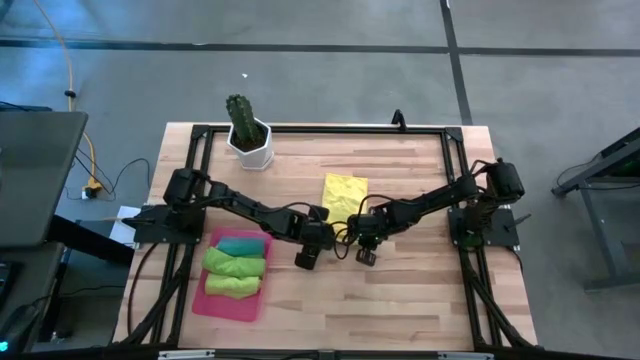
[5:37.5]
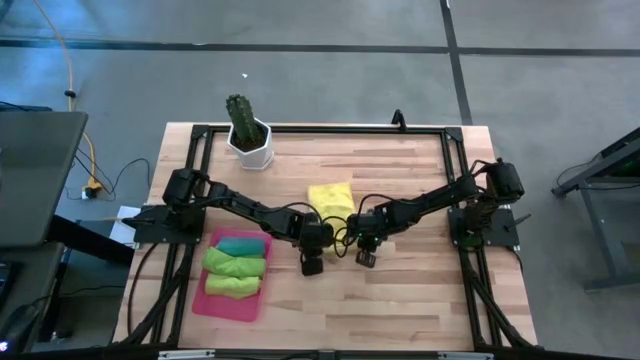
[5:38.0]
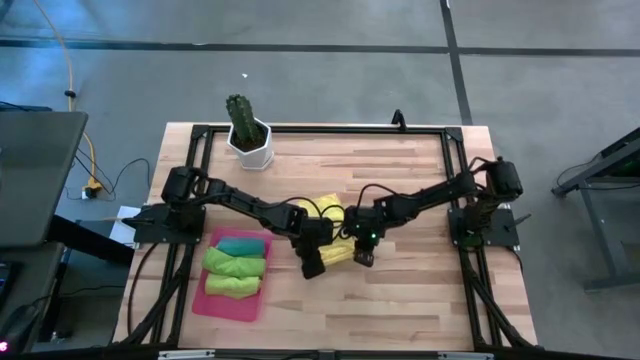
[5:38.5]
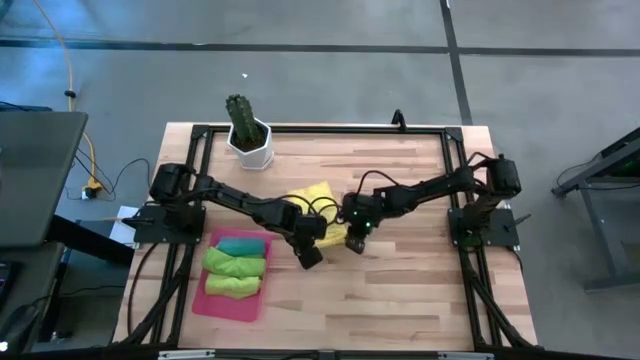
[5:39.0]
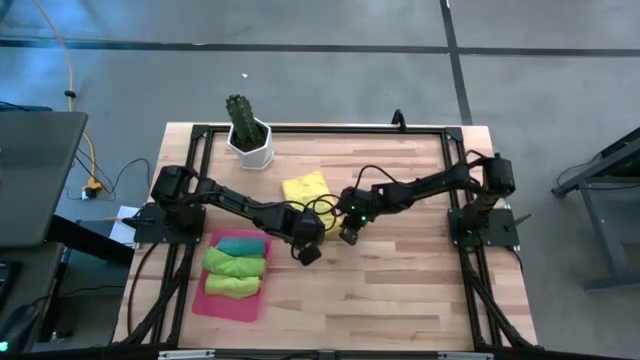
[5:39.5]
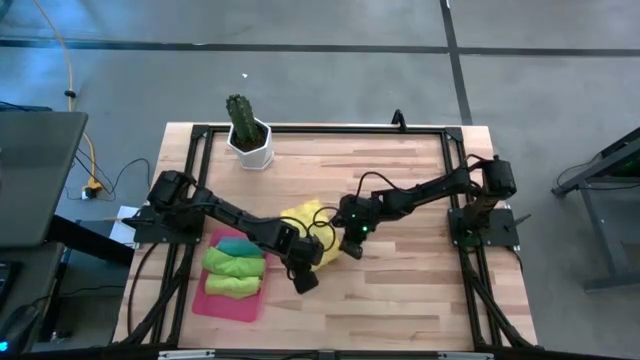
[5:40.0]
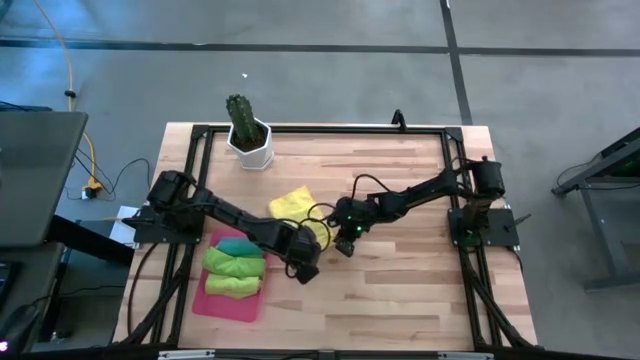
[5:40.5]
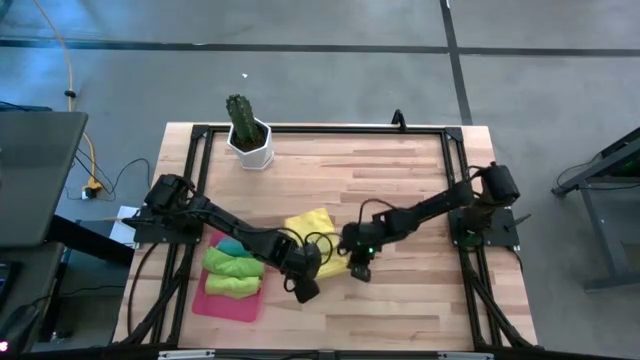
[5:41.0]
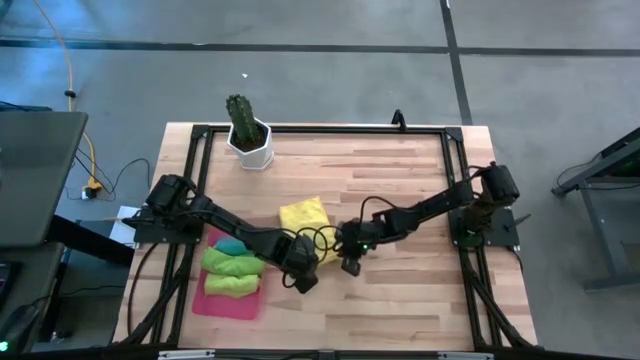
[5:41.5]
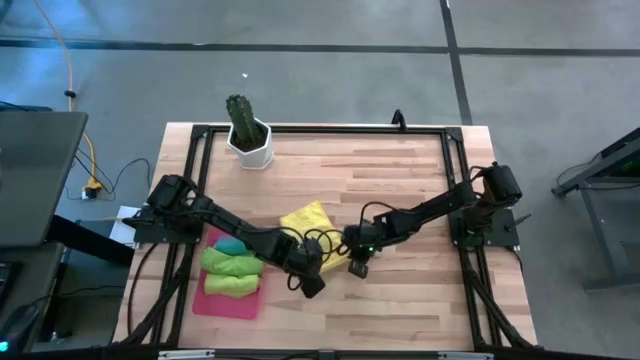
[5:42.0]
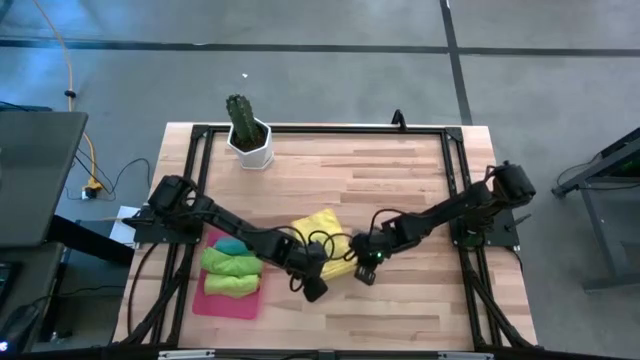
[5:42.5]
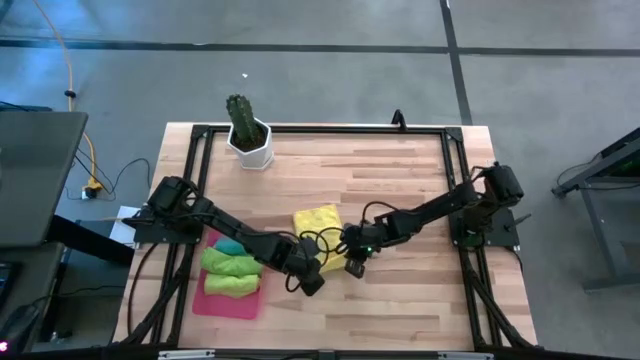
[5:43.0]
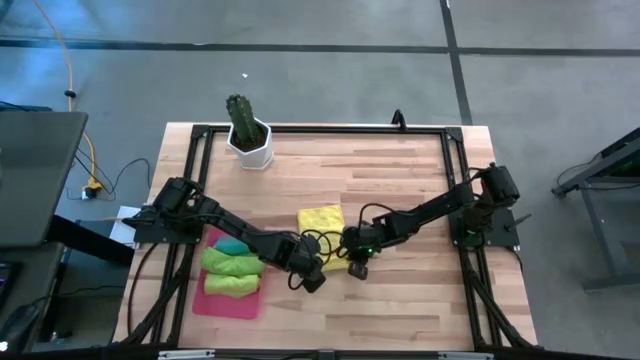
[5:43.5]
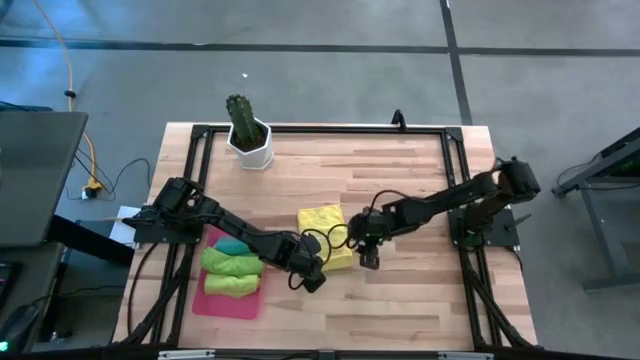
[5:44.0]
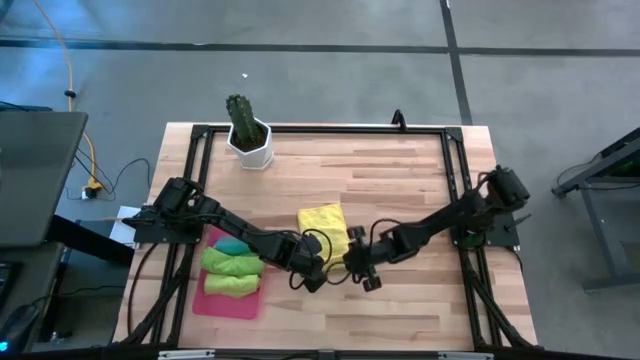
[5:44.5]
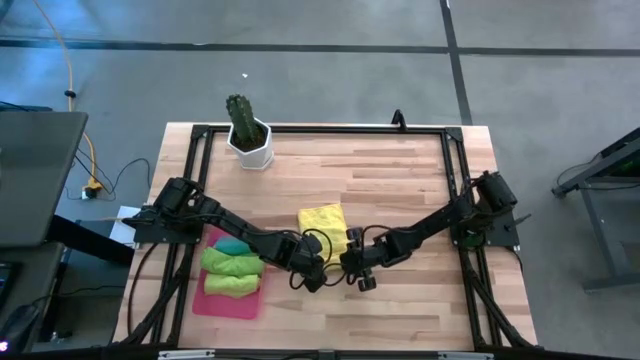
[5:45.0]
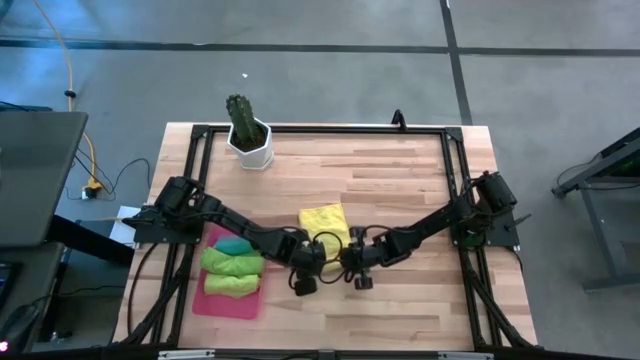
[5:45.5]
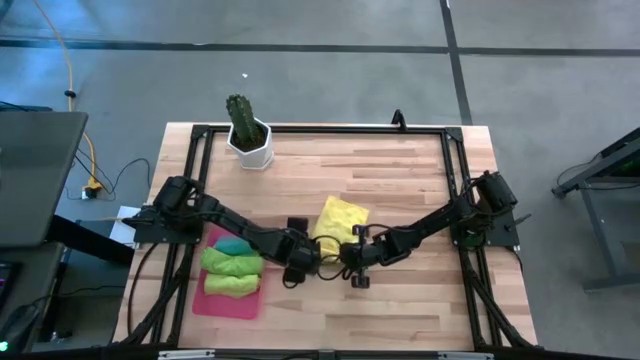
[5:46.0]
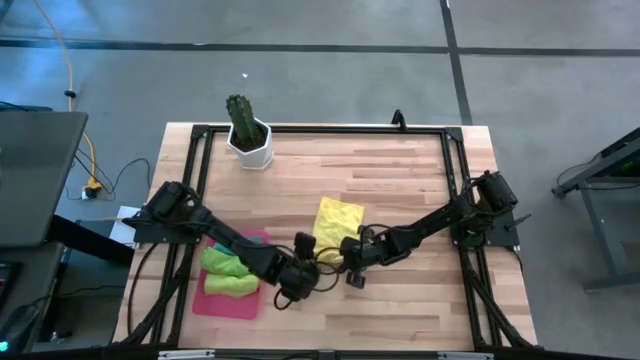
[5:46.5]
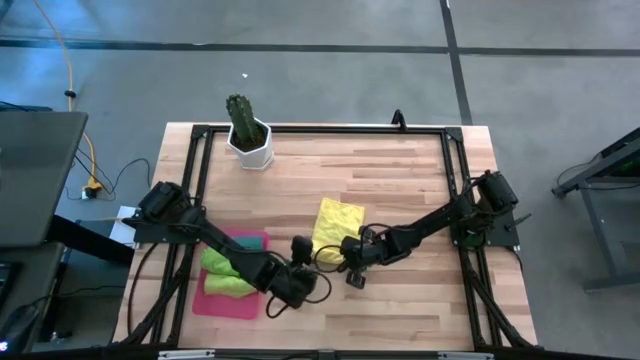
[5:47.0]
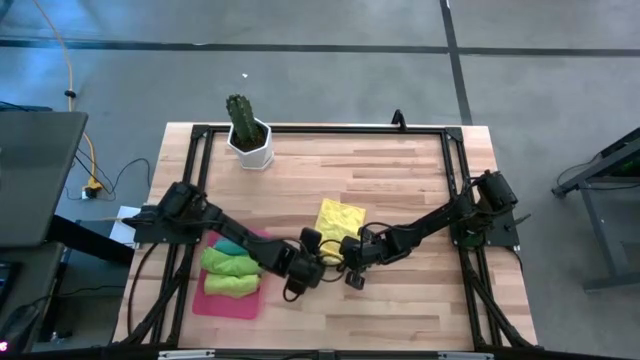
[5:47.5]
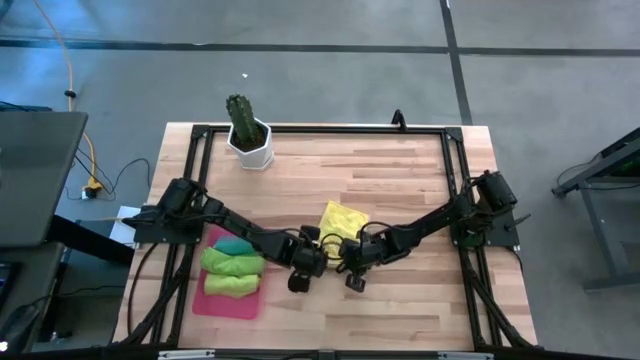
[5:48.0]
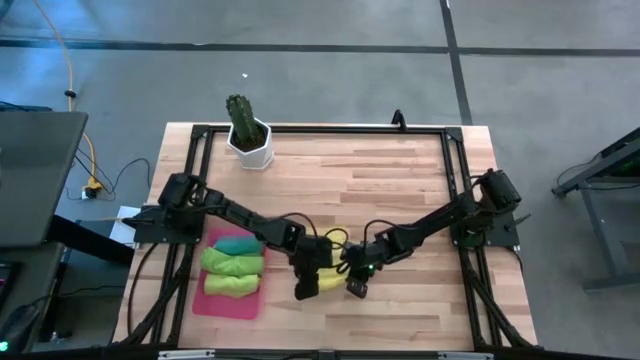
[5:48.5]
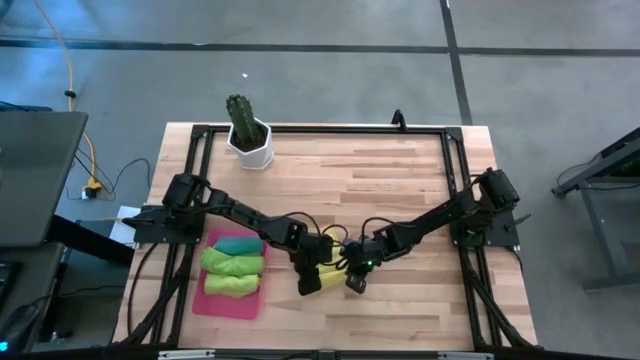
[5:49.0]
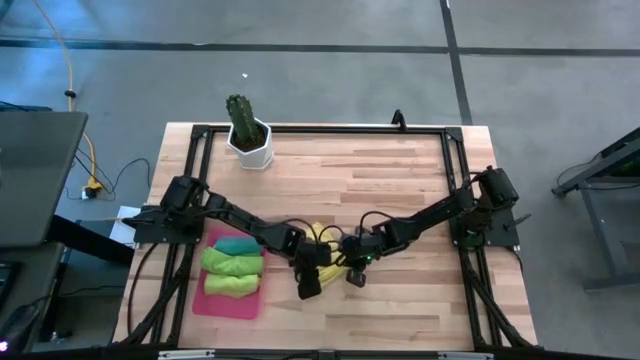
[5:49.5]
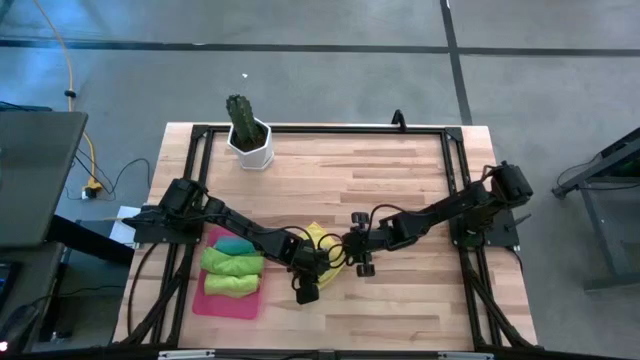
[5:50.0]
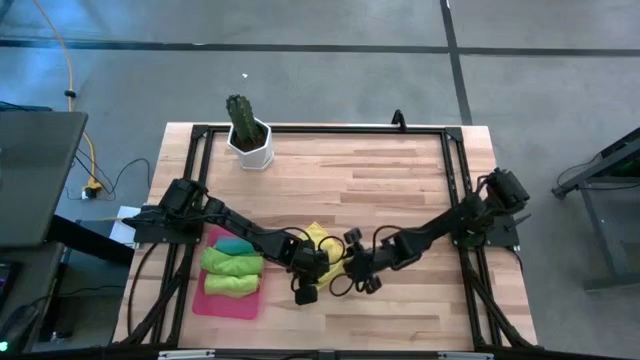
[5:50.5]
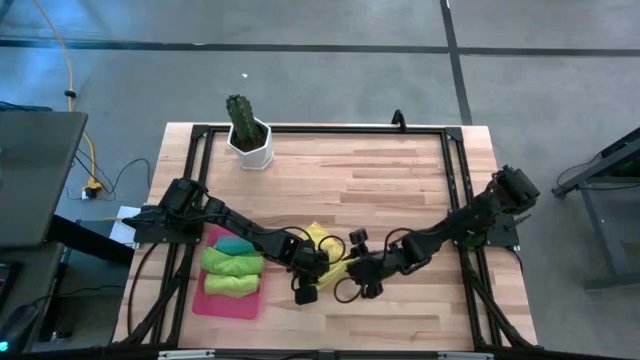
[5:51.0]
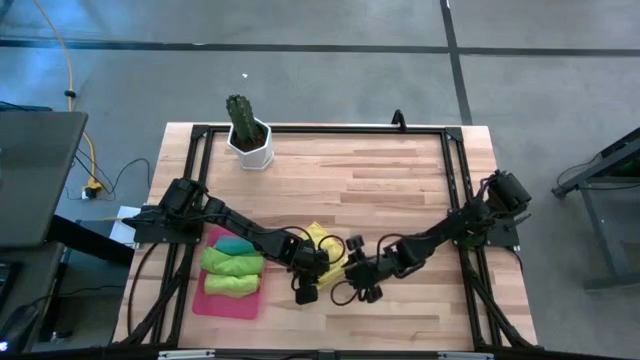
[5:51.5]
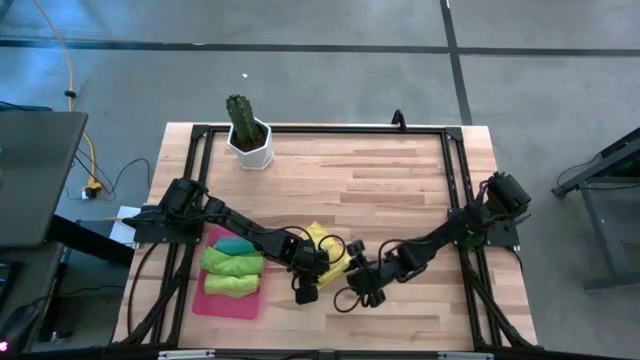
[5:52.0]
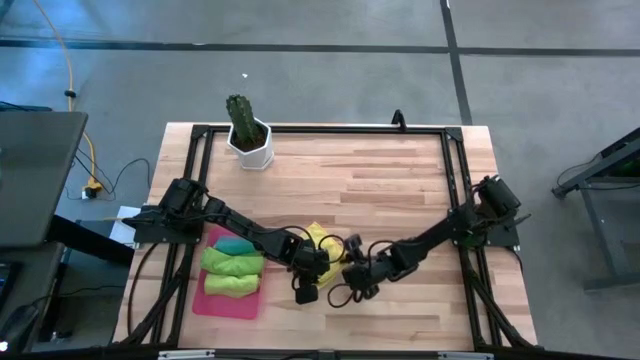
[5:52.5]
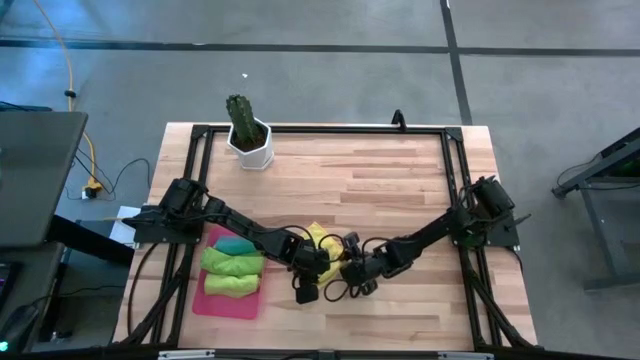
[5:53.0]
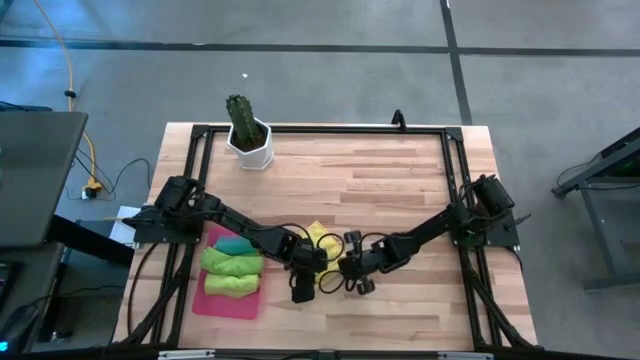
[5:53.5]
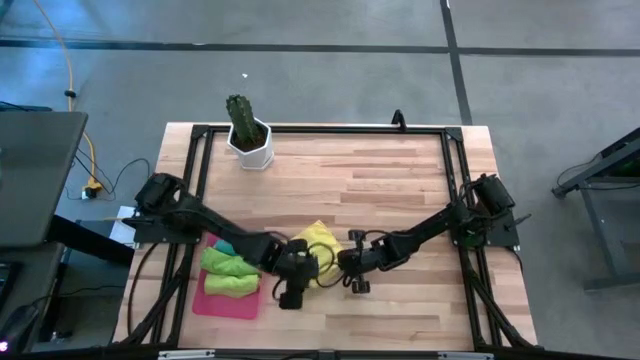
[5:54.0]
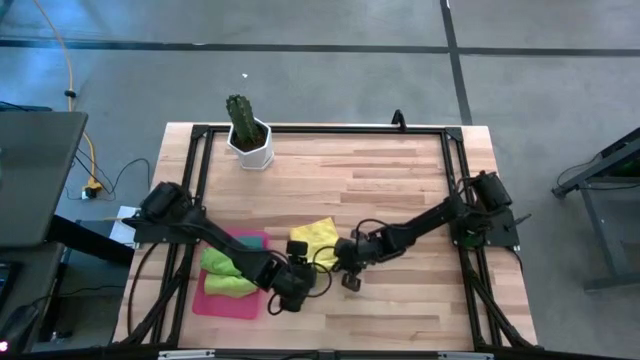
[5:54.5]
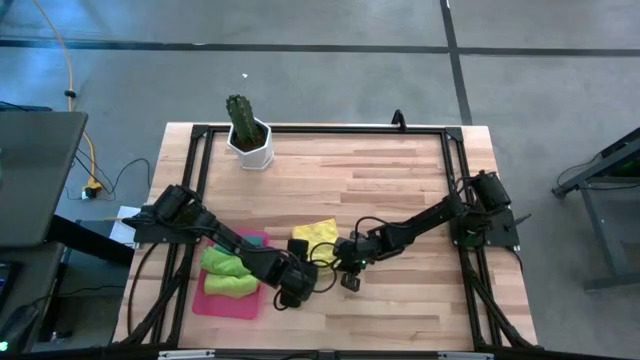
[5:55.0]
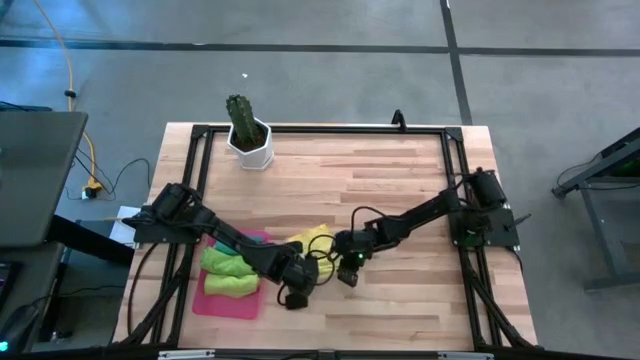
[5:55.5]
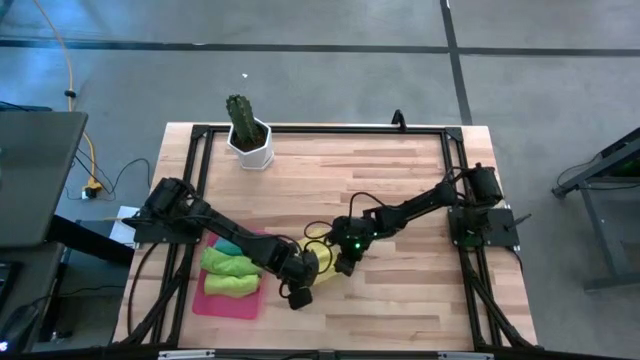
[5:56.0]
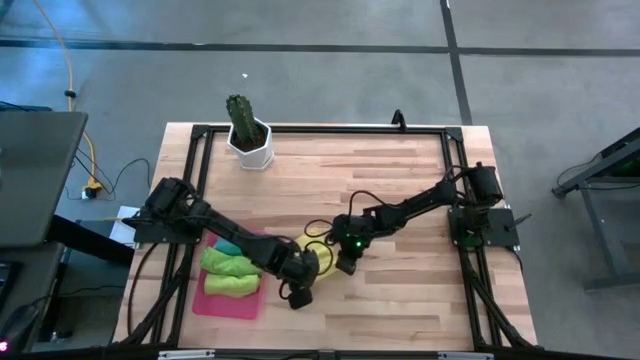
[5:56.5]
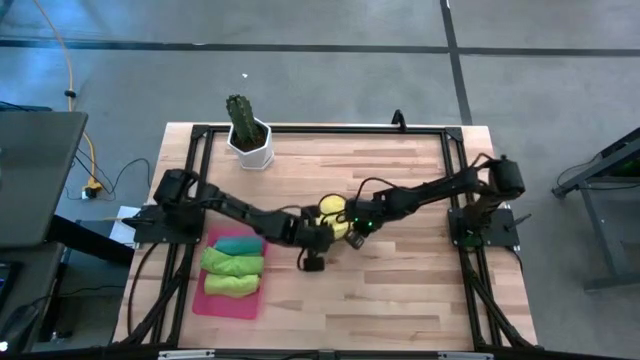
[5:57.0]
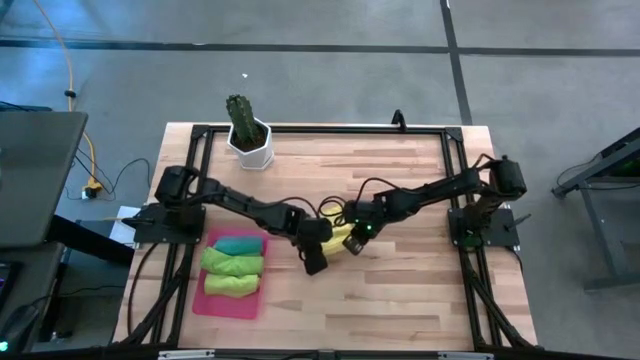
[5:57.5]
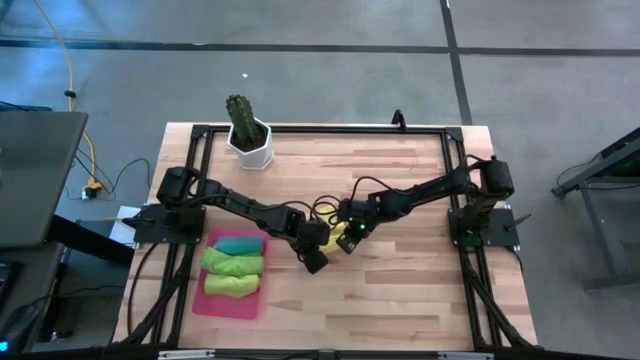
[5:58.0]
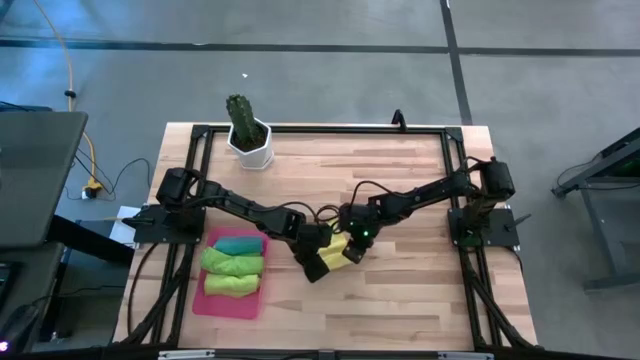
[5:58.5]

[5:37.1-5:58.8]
Task: Roll microfiber towels into tight, uniform cylinder then place into a basket
Roll the yellow towel
